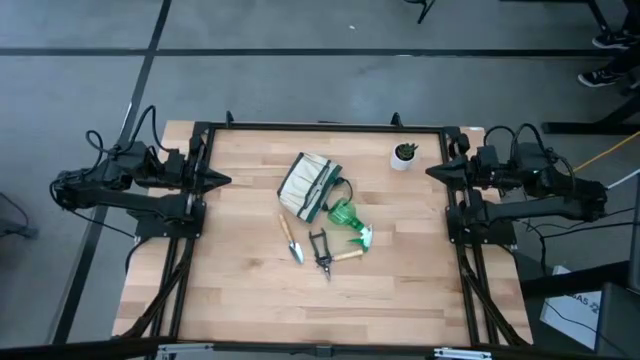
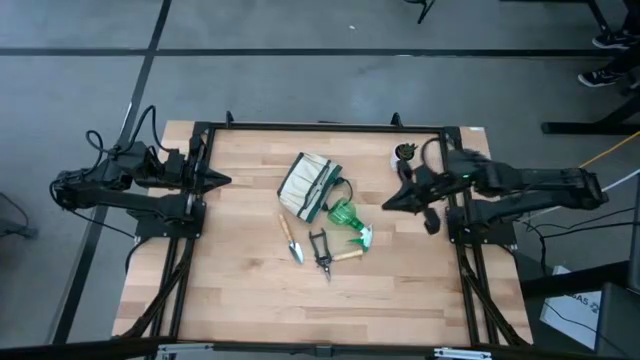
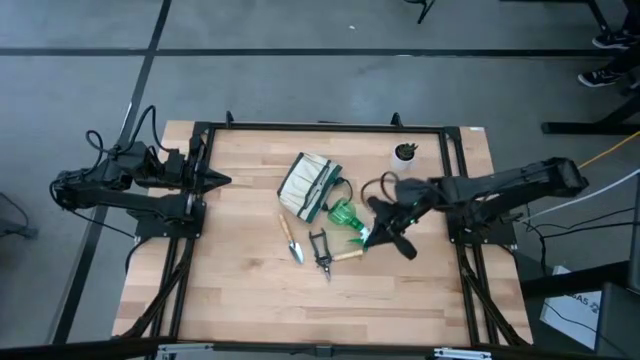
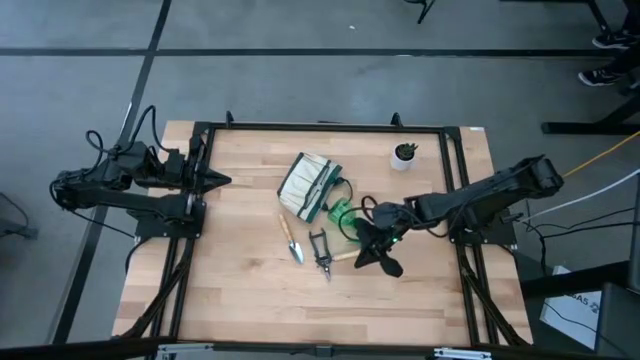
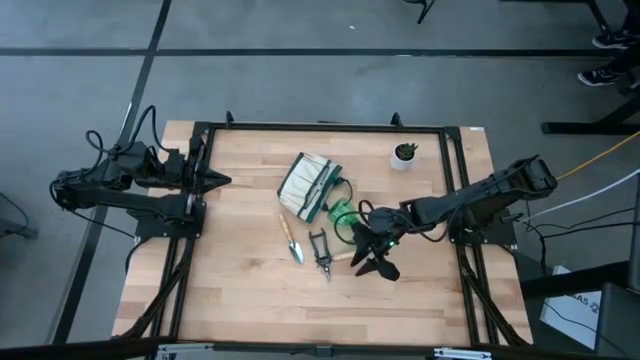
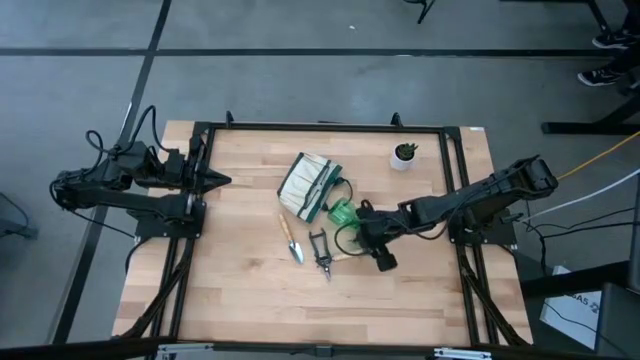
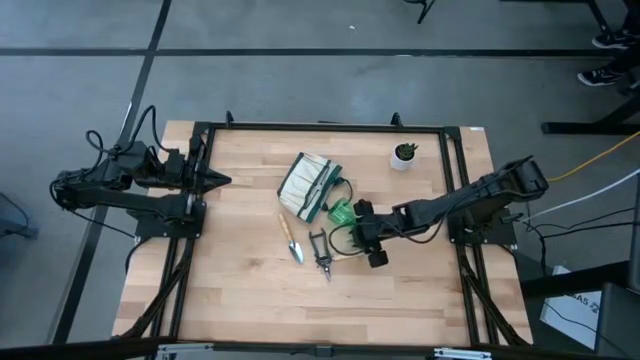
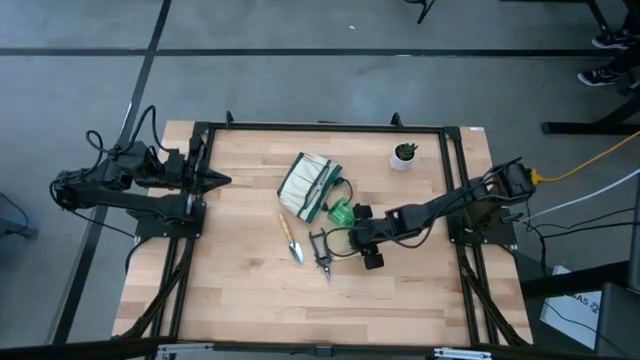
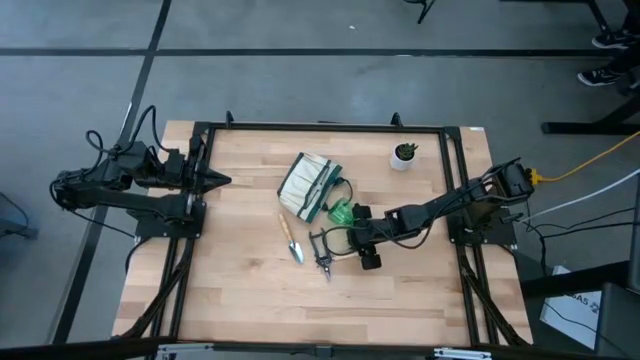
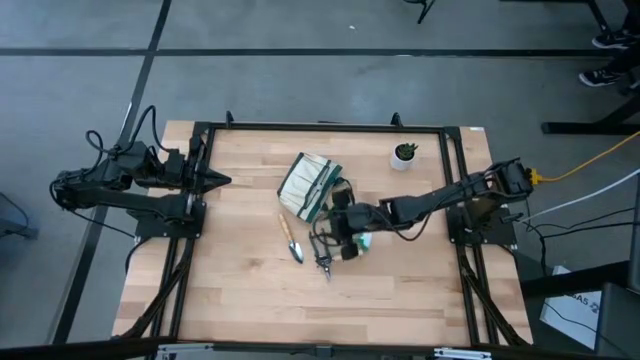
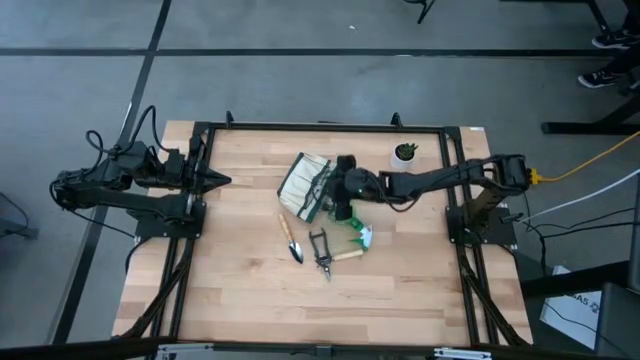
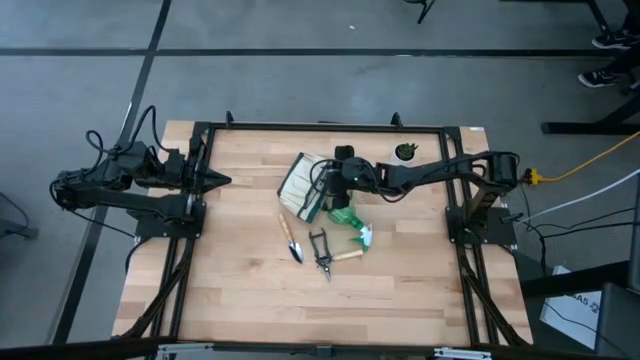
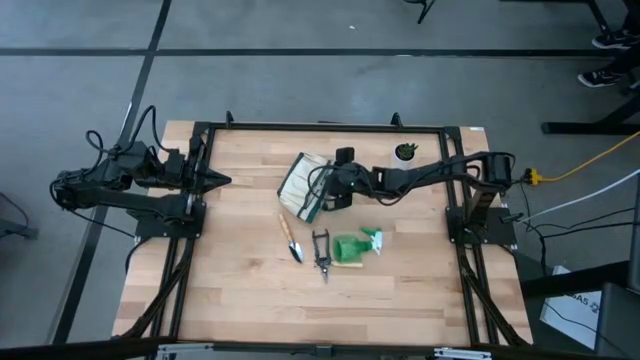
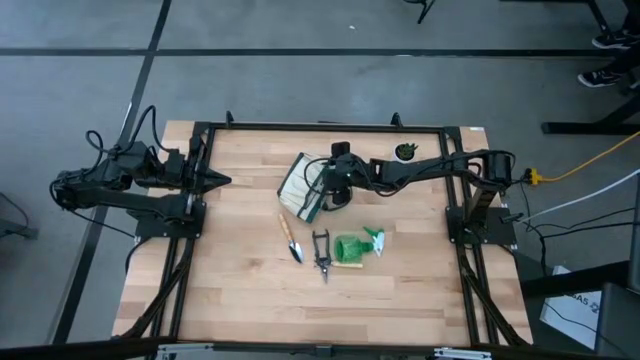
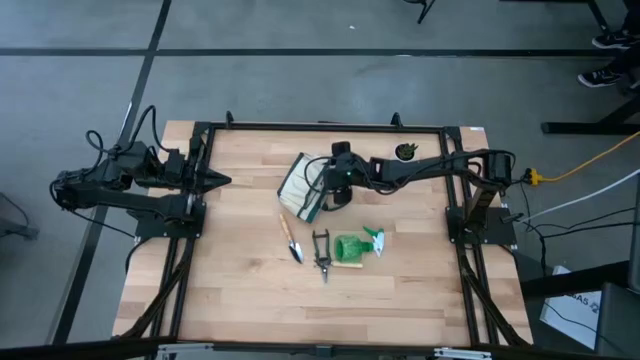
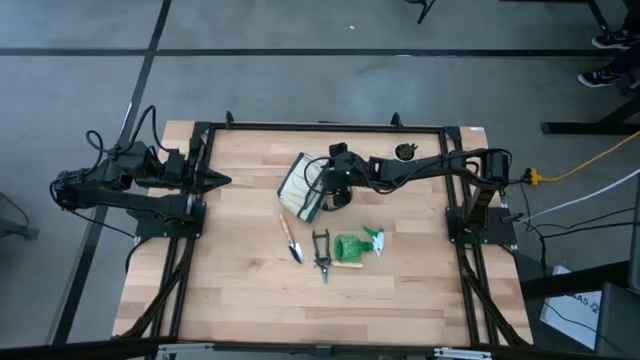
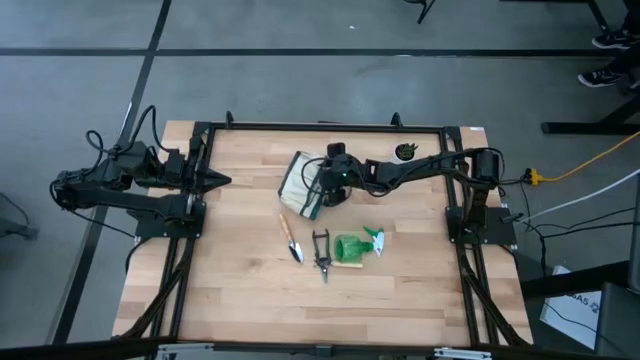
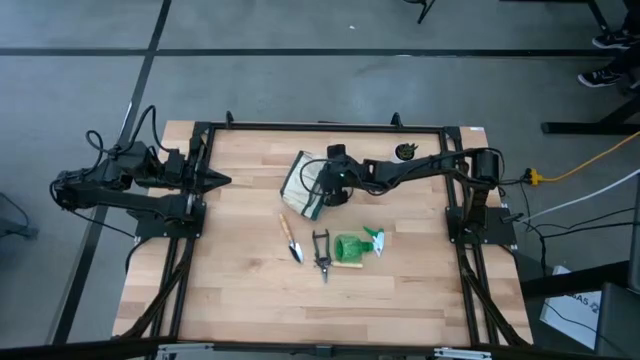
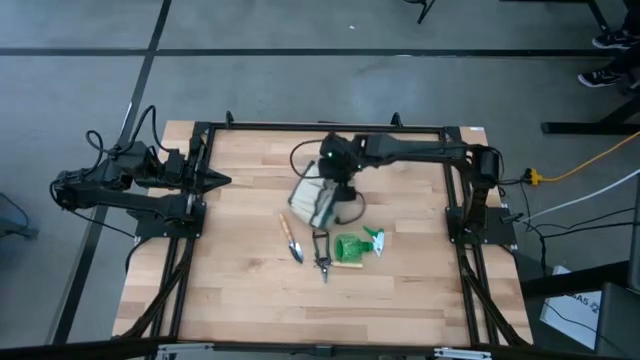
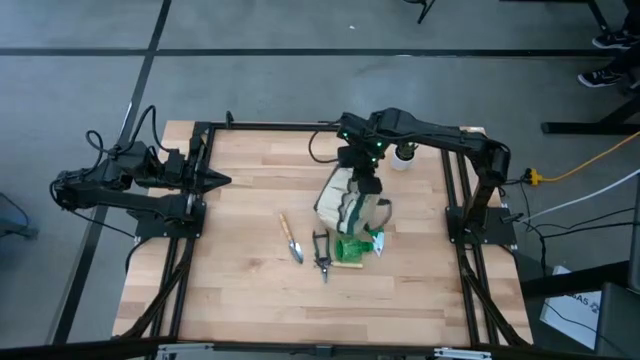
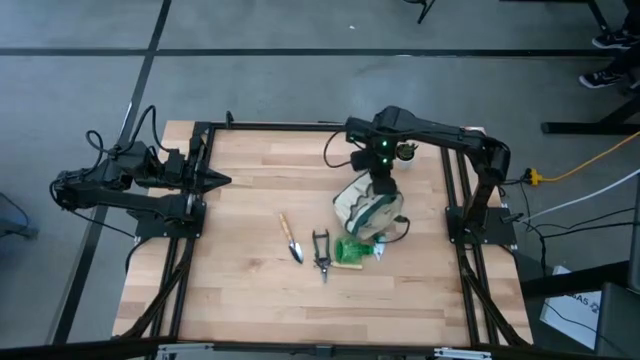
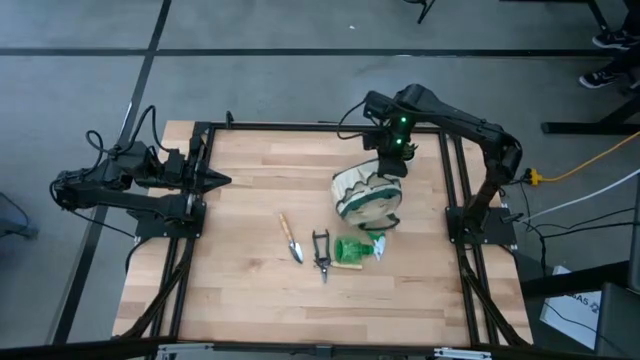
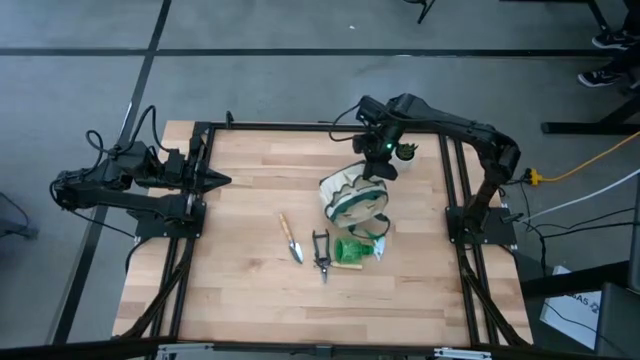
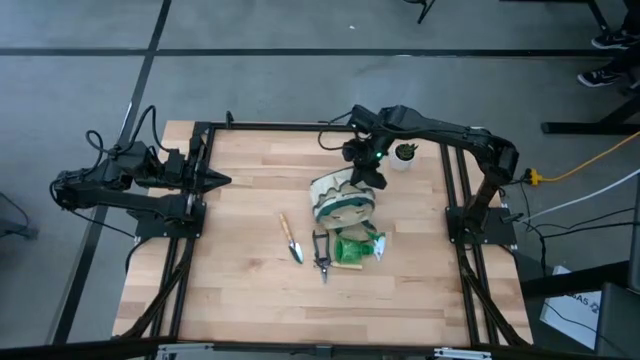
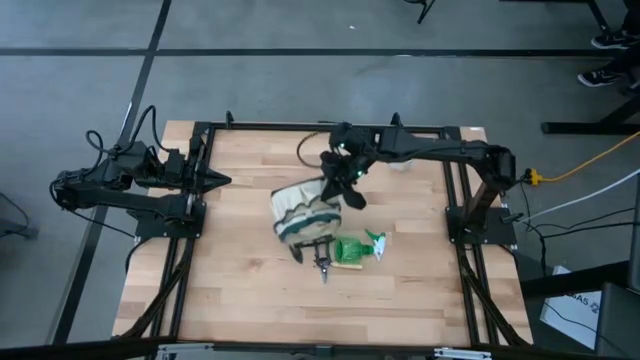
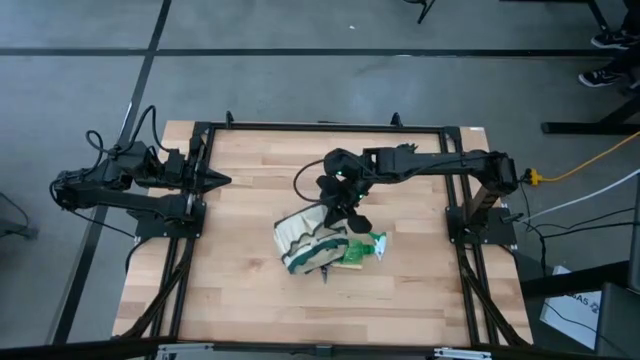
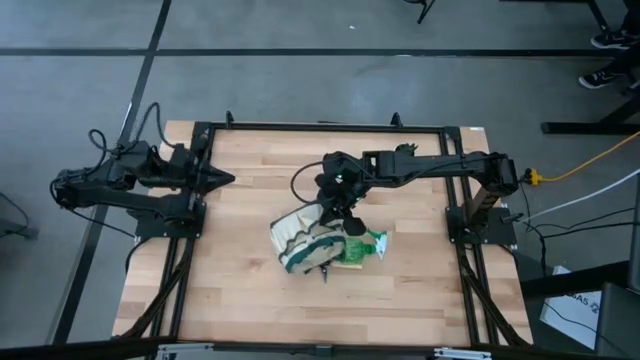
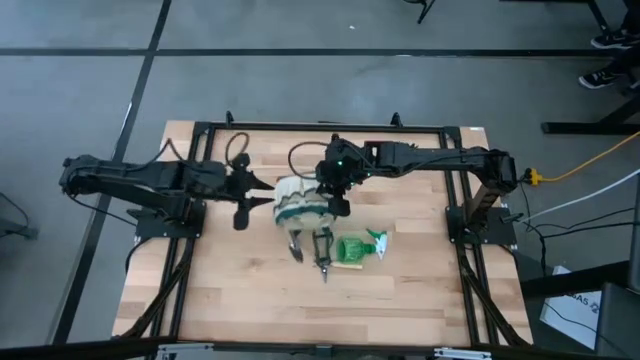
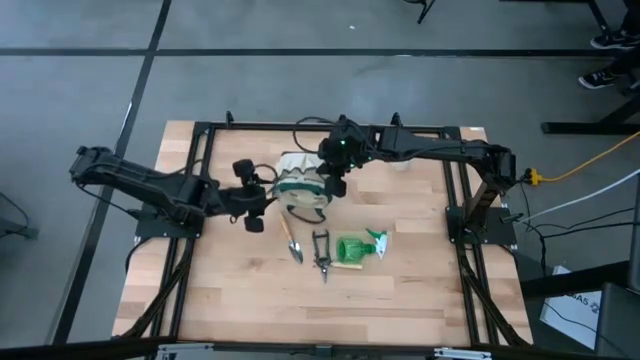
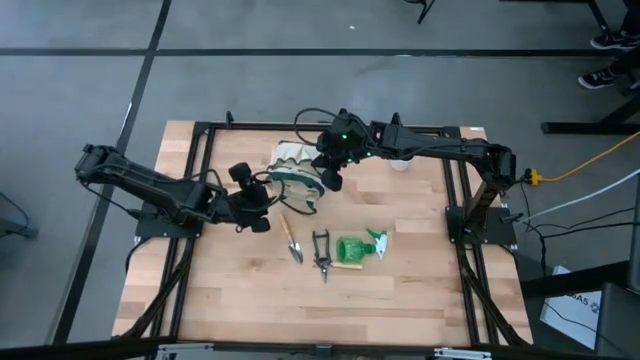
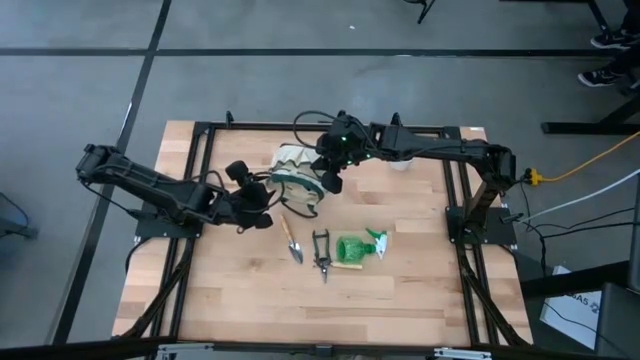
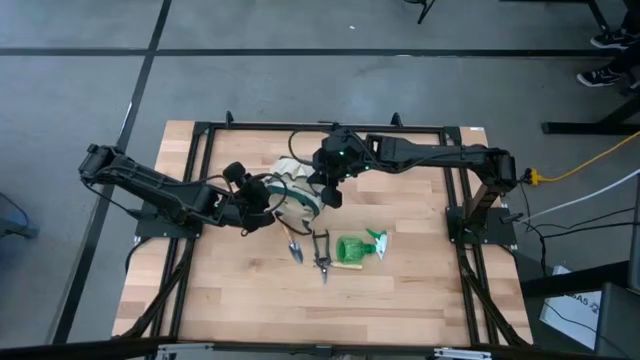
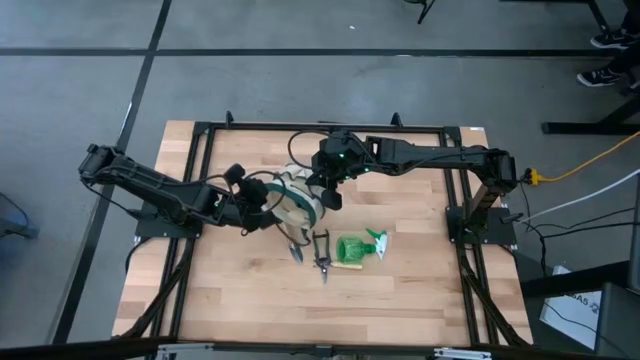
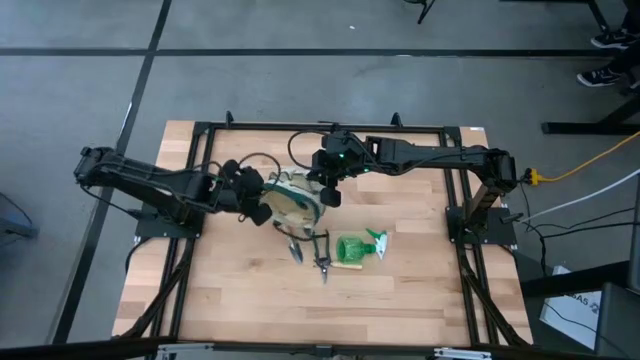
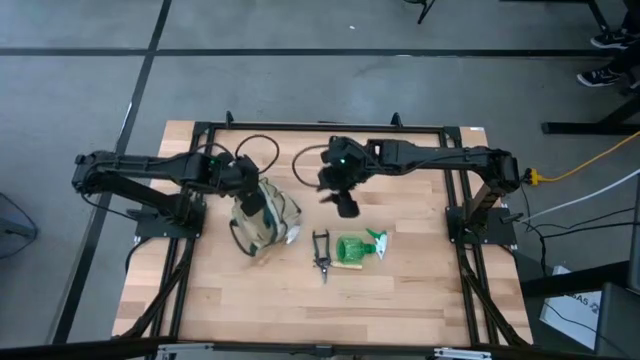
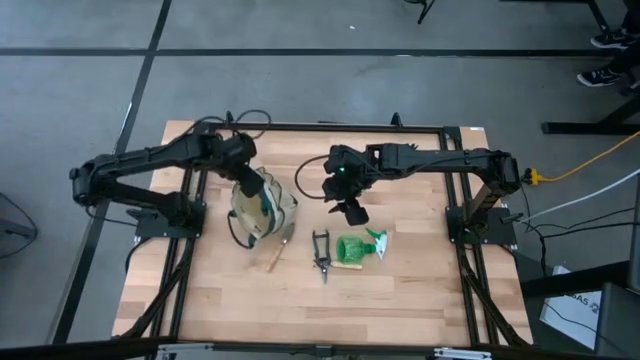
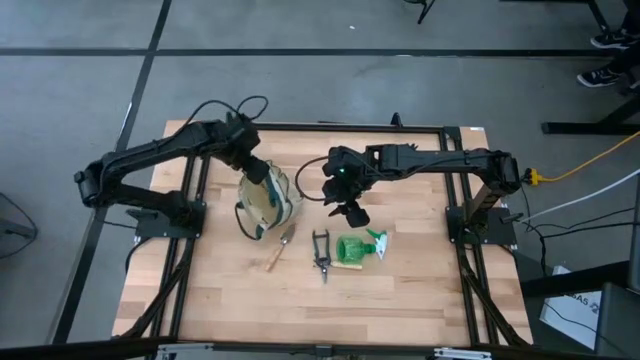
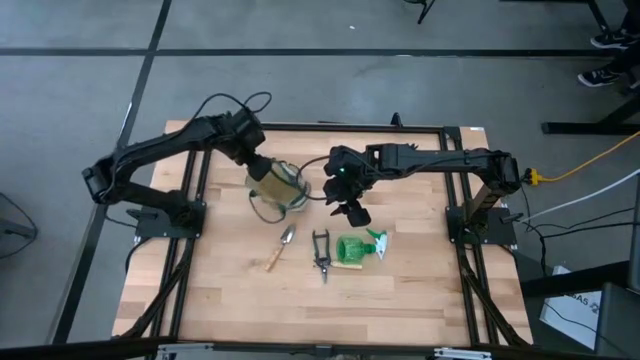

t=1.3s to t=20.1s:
Task: Pick & Place Garden tools in Gardening bag
Adjust the gardening bag
